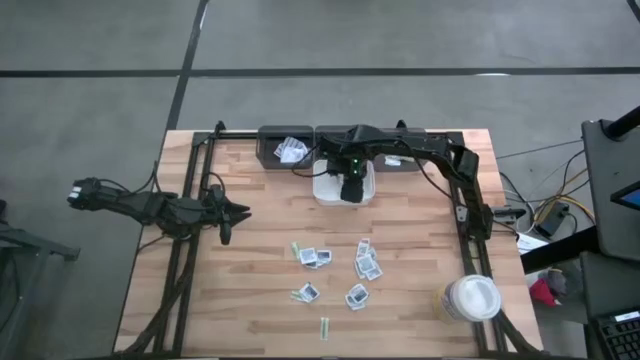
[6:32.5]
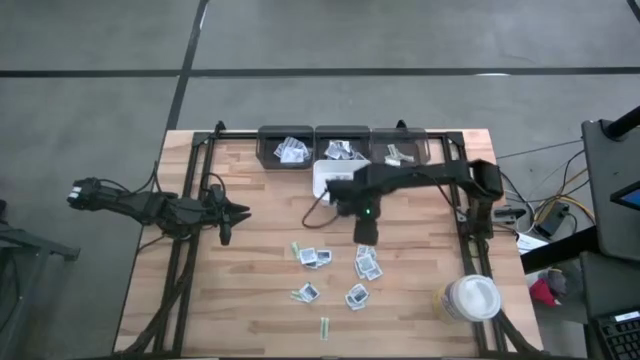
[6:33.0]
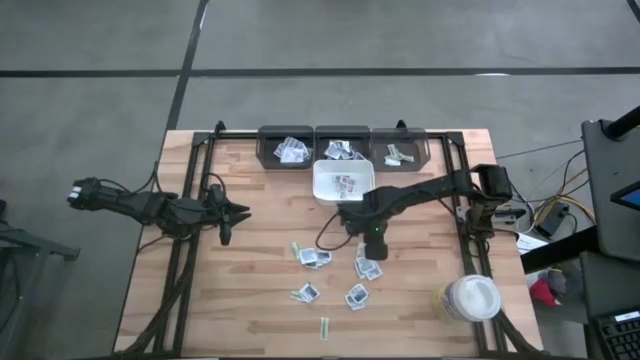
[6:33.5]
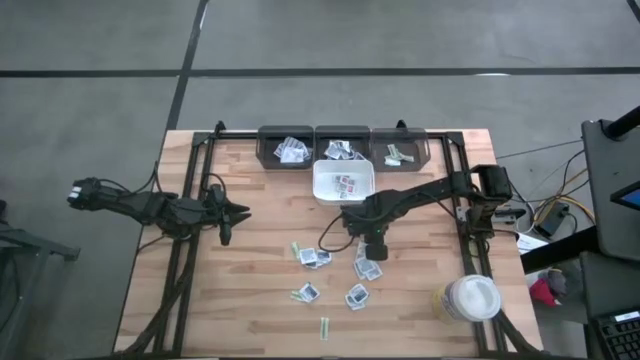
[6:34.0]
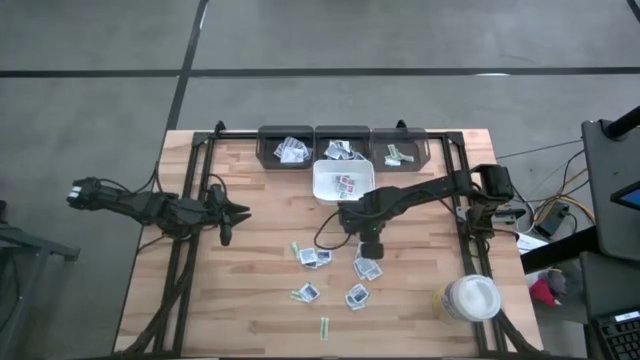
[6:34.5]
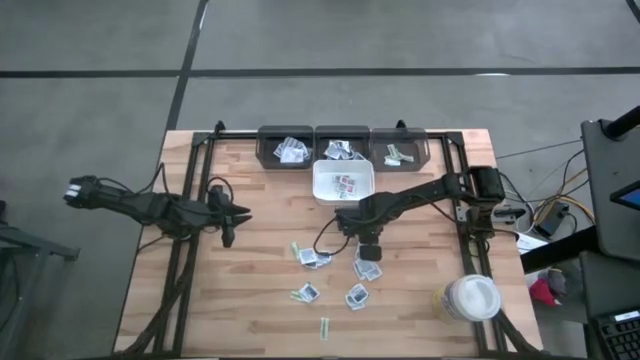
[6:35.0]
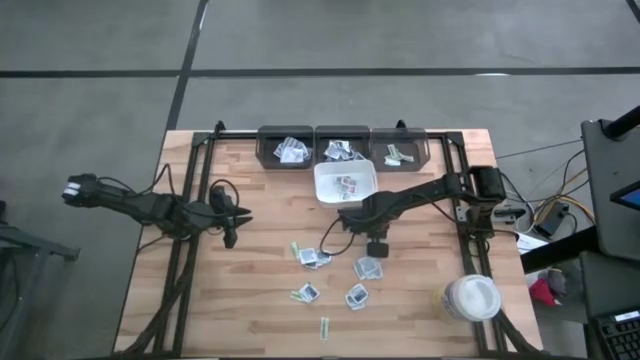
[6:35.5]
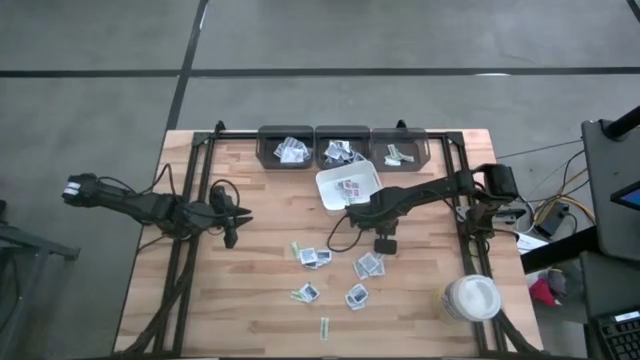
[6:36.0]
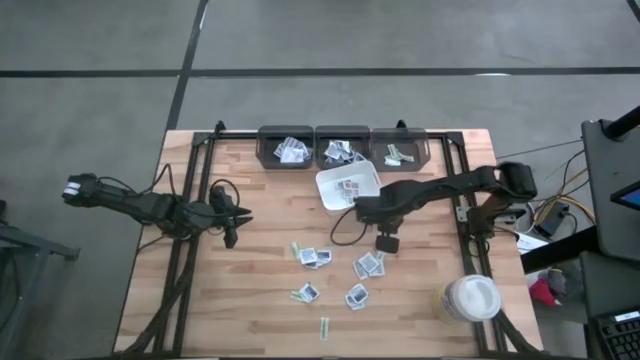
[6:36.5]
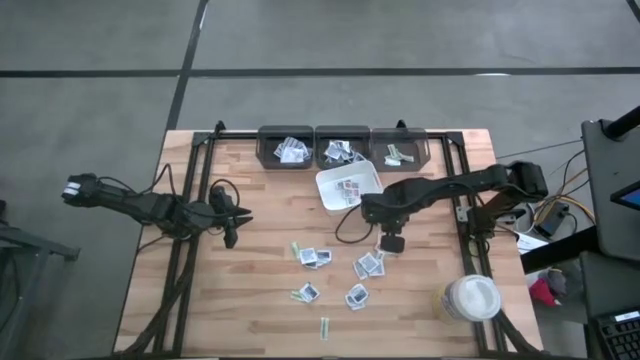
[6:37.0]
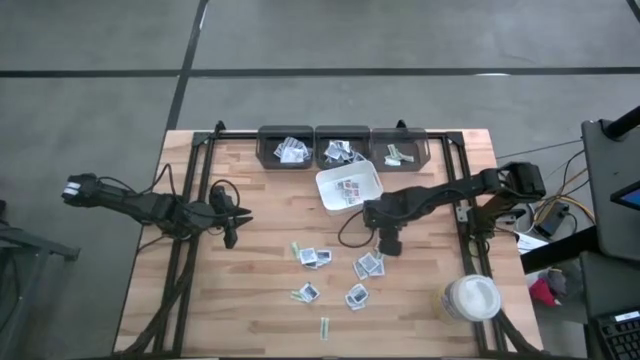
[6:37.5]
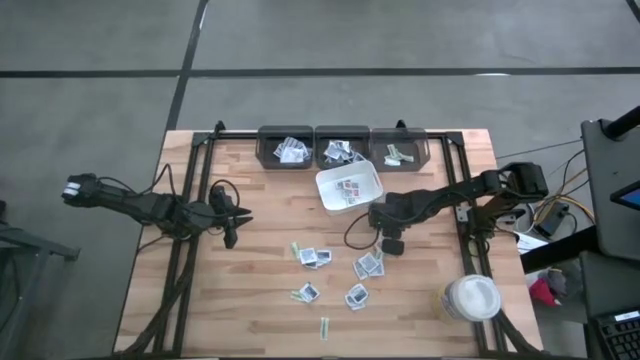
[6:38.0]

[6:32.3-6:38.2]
Task: Pick & Place First Aid Supplies
Put the orange ointment pack into the white bin

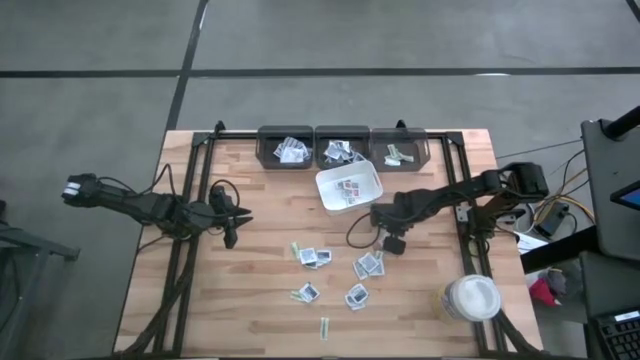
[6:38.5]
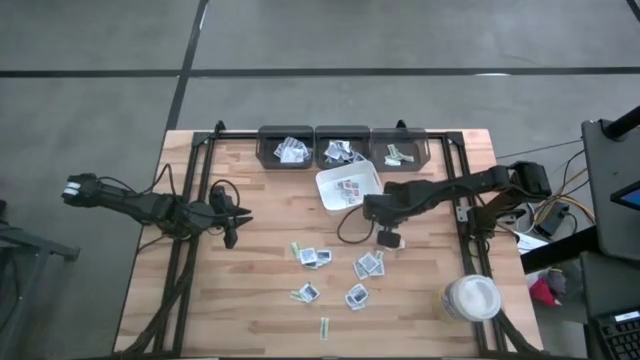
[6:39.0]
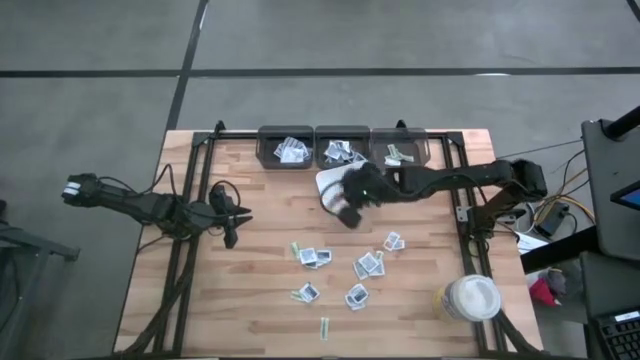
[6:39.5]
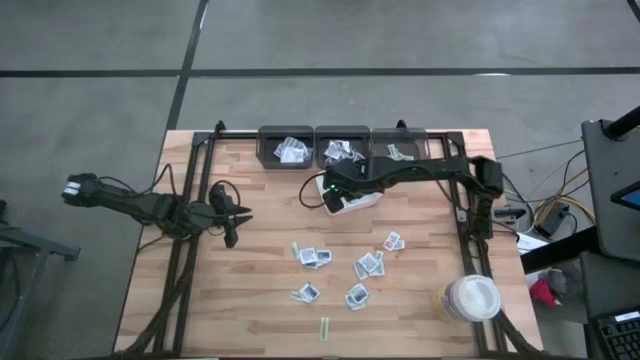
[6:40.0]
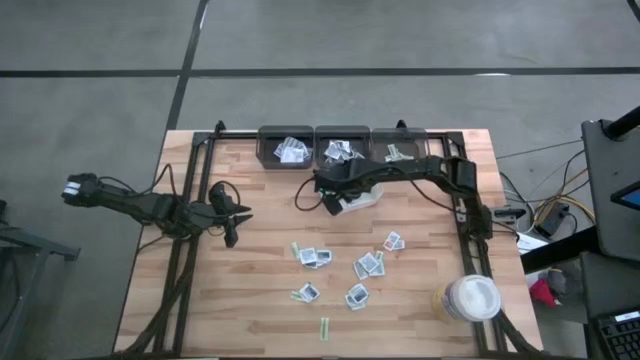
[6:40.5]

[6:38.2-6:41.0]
Put the orange ointment pack into the white bin

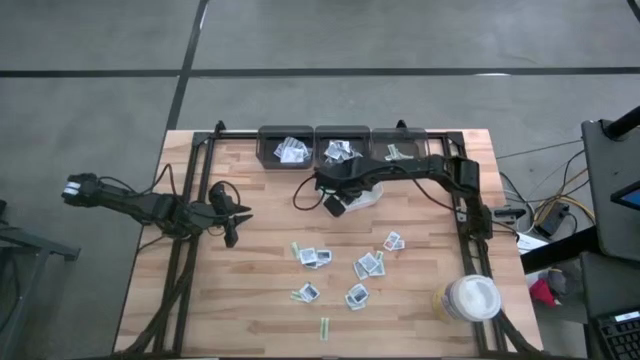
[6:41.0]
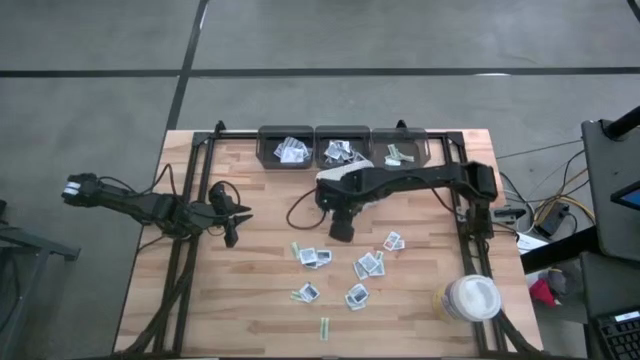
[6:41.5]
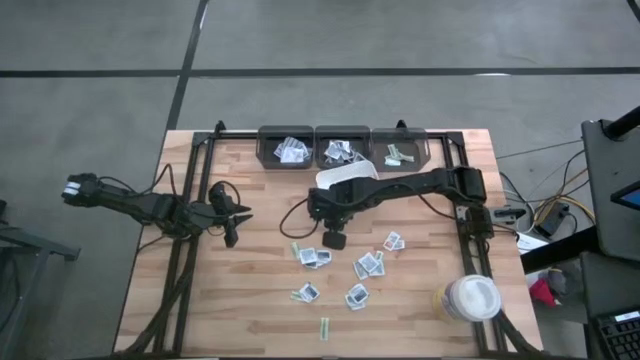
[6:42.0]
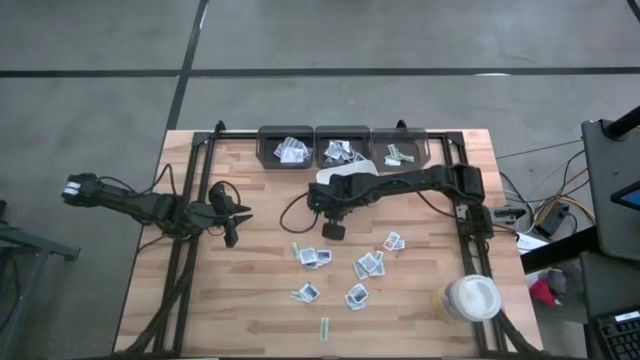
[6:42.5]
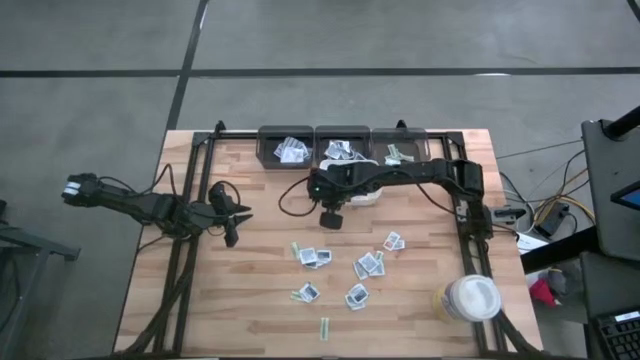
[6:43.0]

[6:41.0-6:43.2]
Adjust the white bin on the table

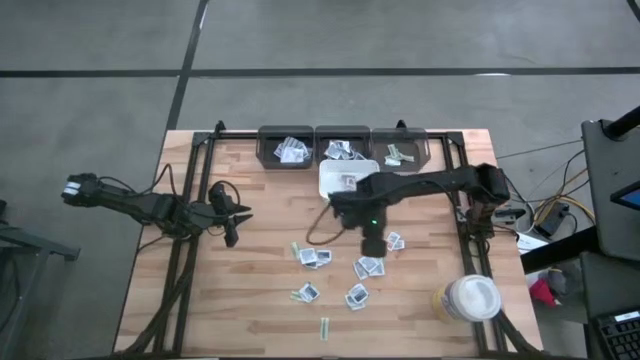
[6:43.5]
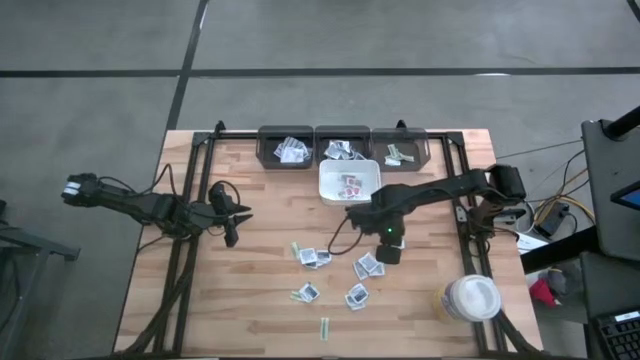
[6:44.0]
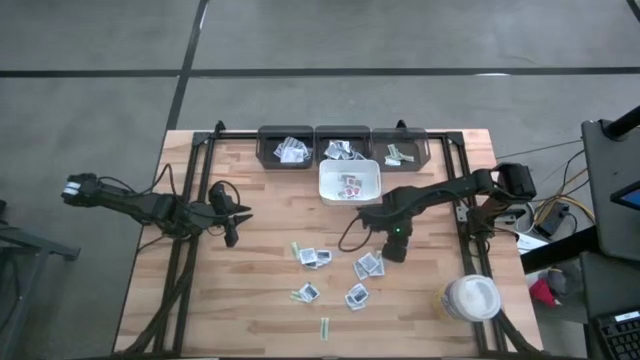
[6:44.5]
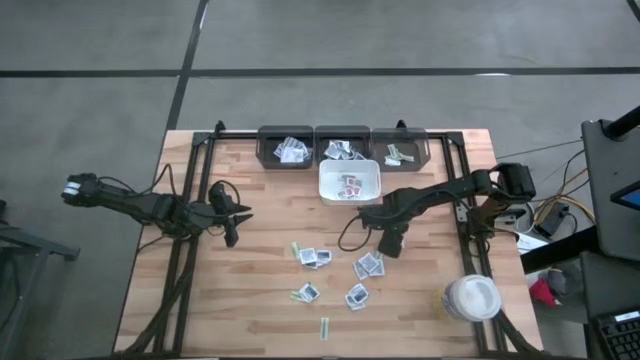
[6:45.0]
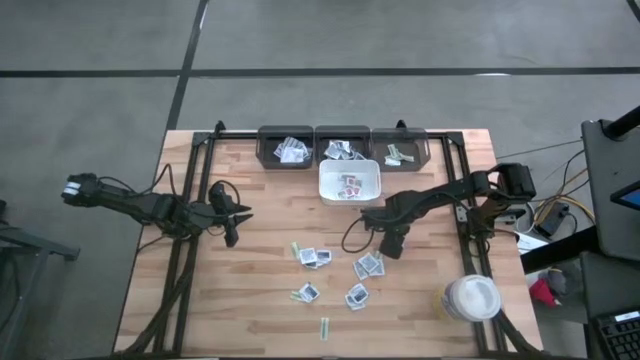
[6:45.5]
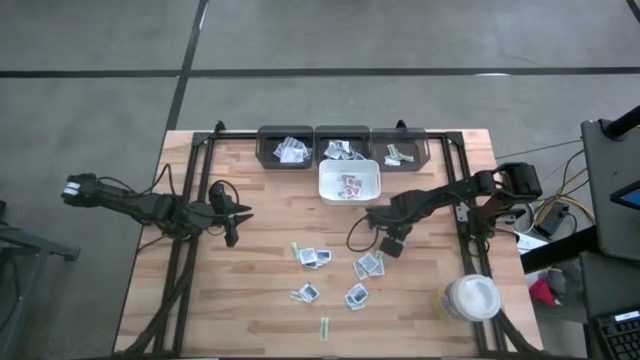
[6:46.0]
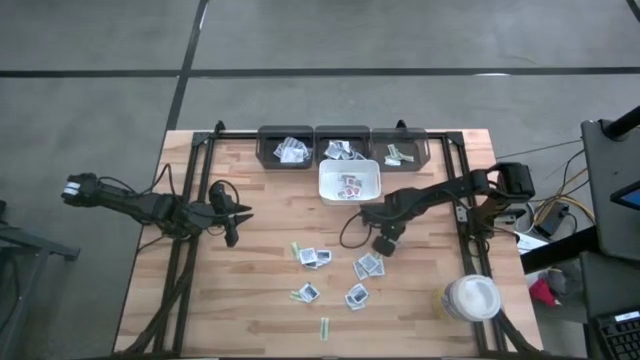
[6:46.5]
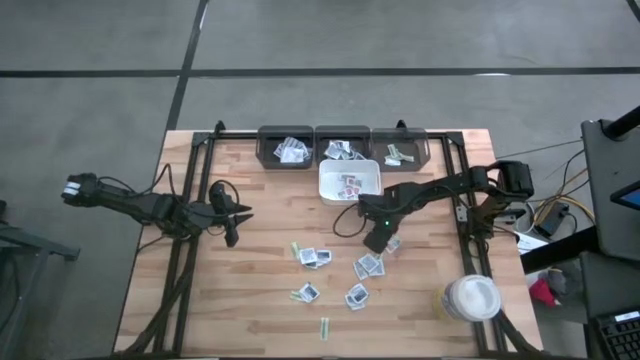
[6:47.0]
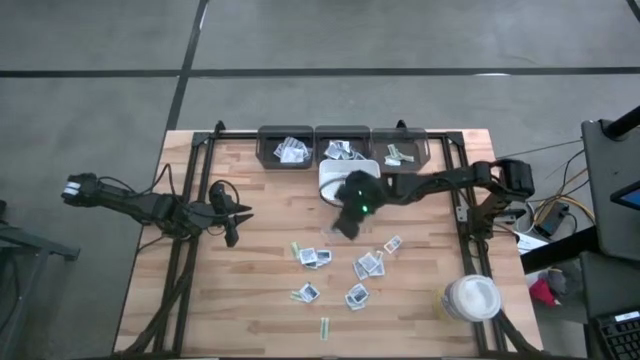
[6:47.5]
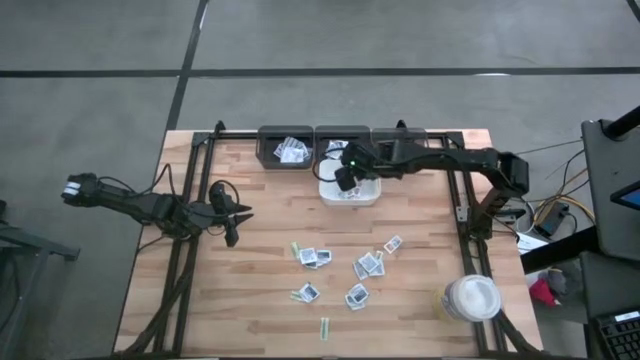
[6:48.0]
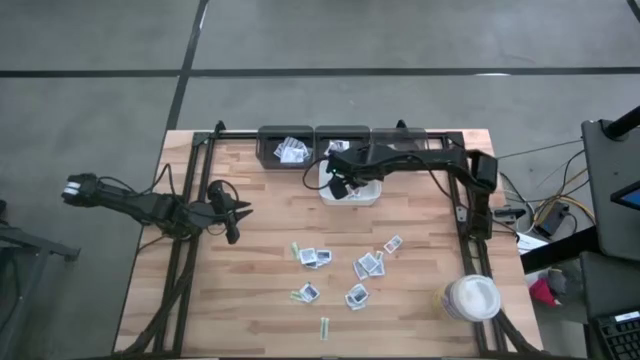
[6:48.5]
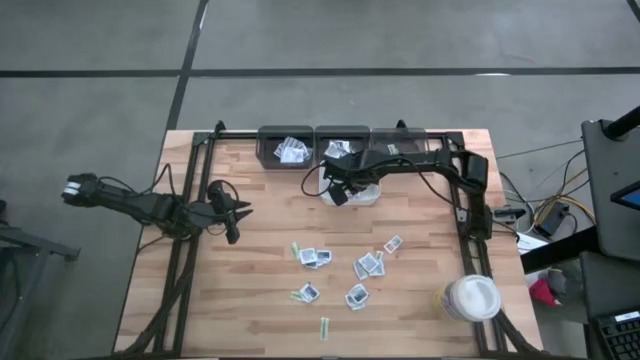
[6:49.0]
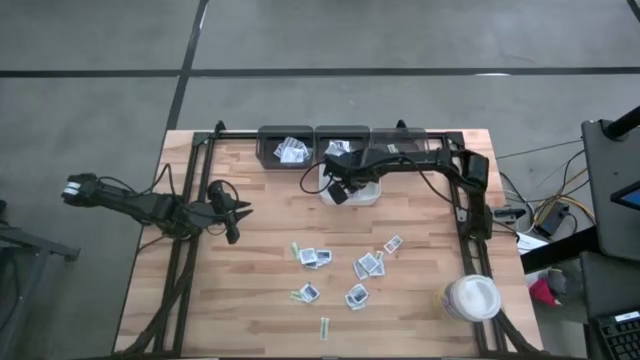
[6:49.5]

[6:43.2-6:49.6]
Put the top orange ointment pack into the white bin

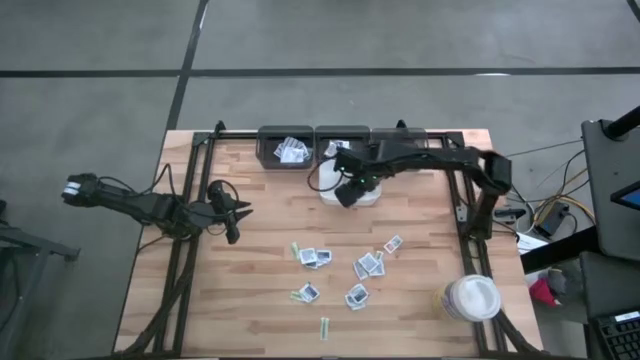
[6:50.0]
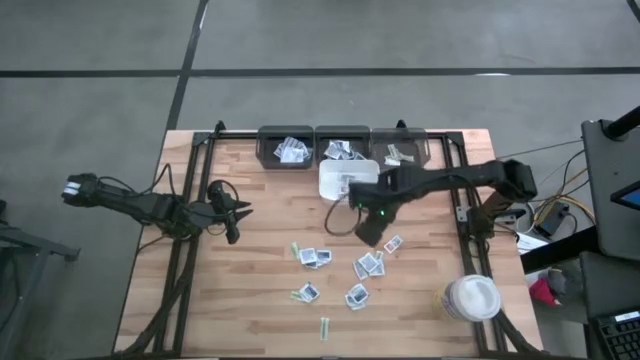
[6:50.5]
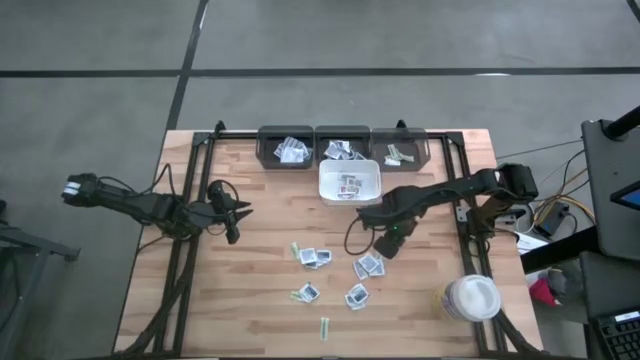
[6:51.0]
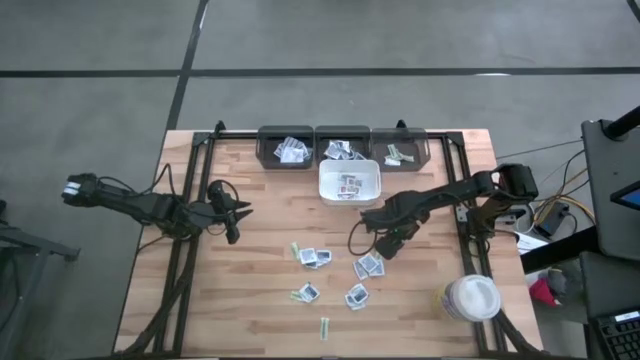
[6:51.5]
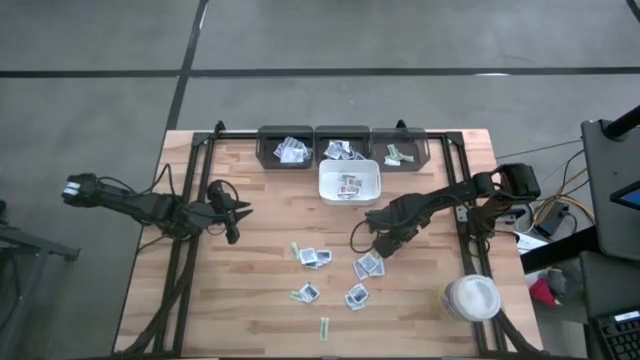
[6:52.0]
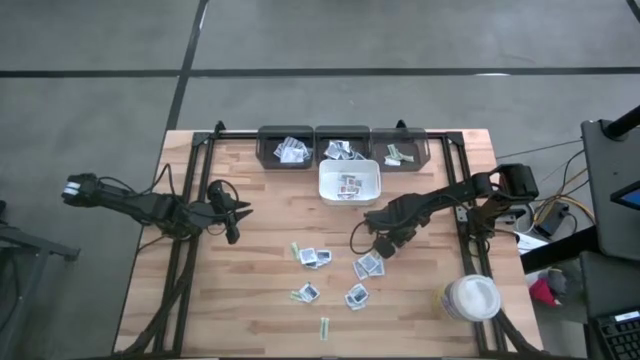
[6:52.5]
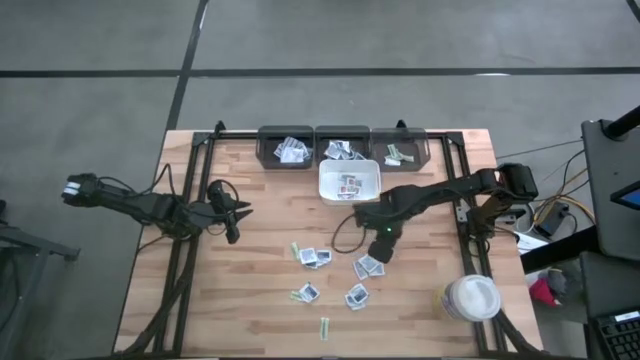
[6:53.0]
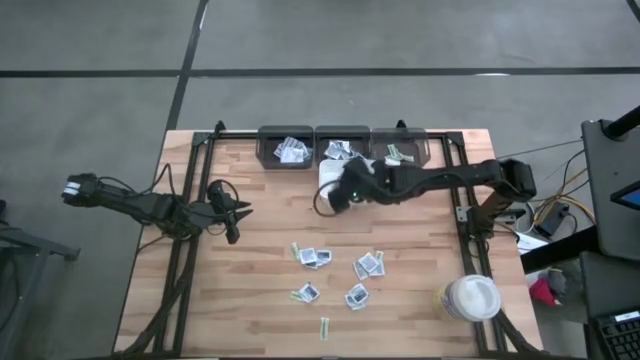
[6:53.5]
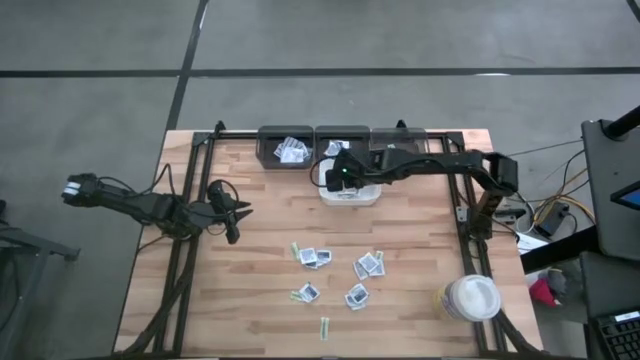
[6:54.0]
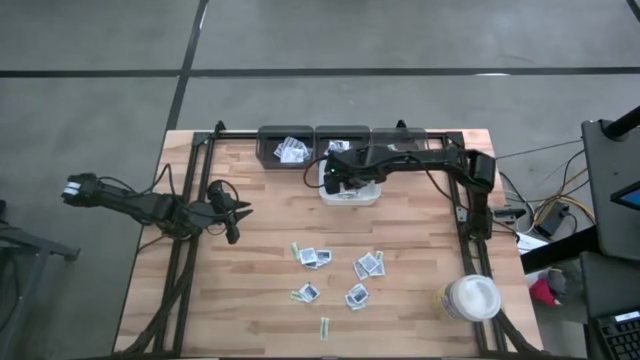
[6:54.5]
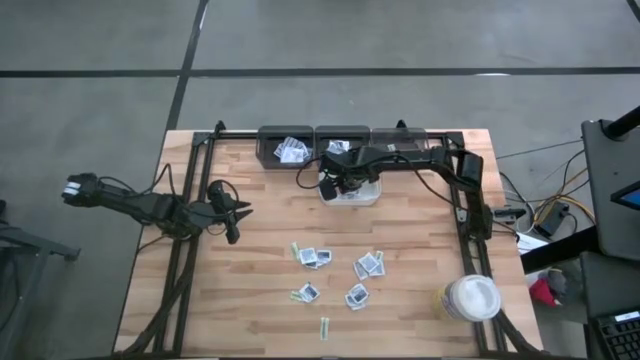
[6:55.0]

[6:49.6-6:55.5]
Put the top orange ointment pack into the white bin
